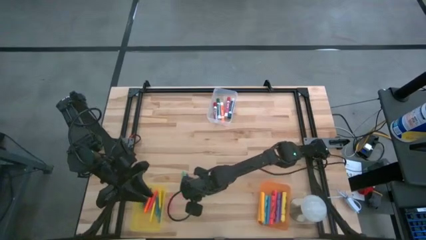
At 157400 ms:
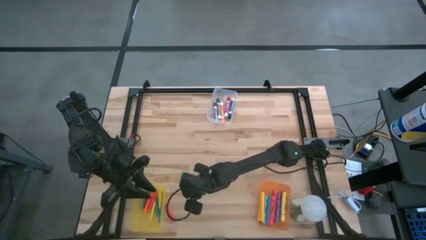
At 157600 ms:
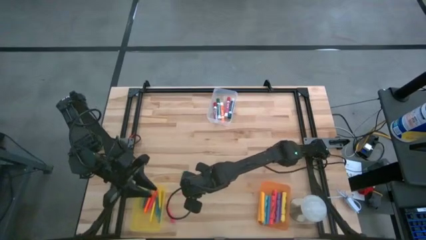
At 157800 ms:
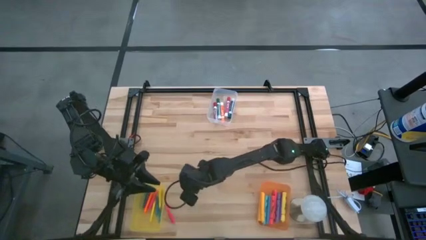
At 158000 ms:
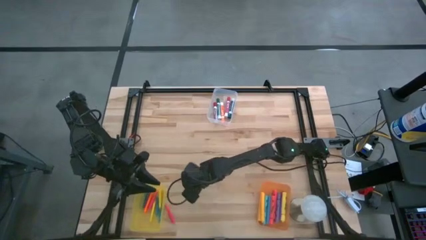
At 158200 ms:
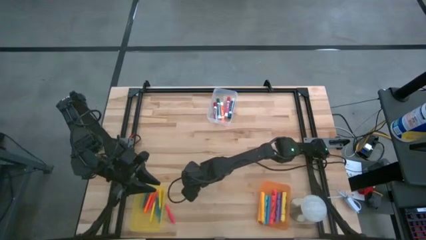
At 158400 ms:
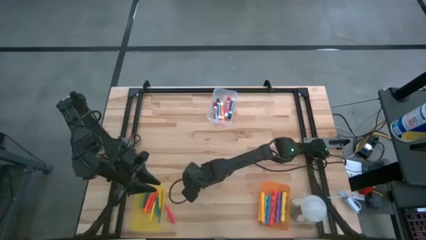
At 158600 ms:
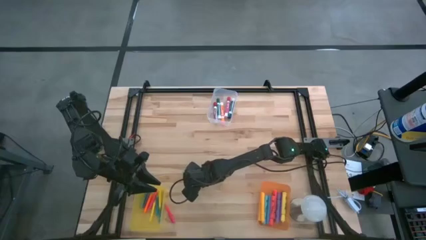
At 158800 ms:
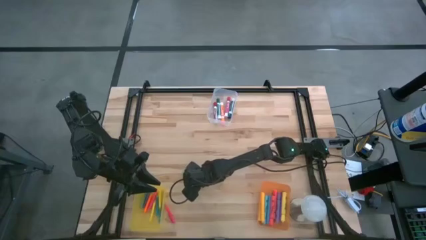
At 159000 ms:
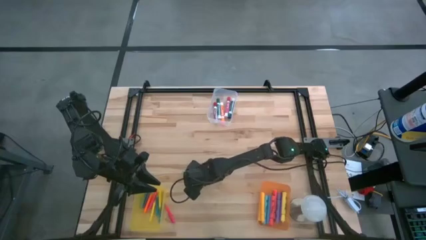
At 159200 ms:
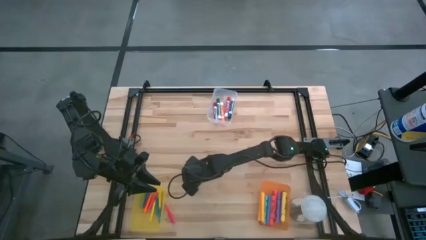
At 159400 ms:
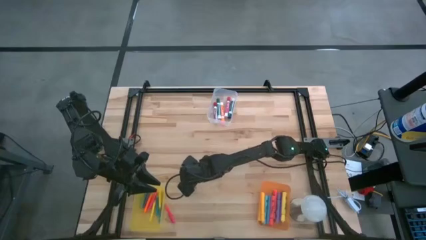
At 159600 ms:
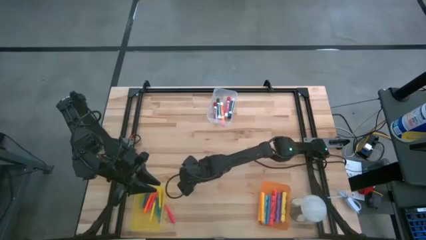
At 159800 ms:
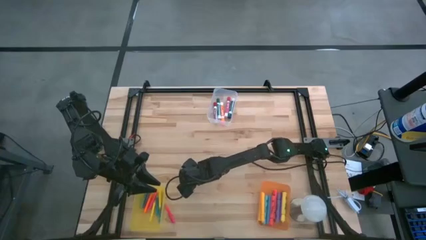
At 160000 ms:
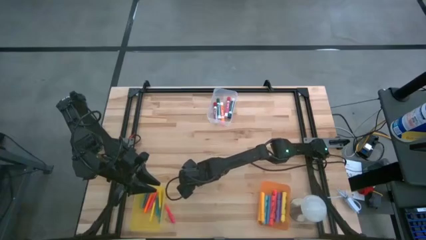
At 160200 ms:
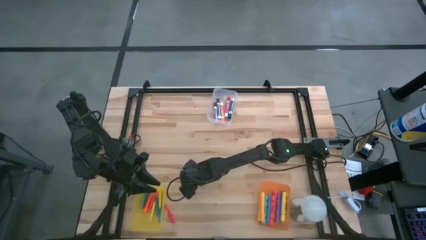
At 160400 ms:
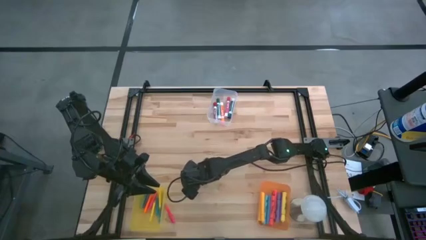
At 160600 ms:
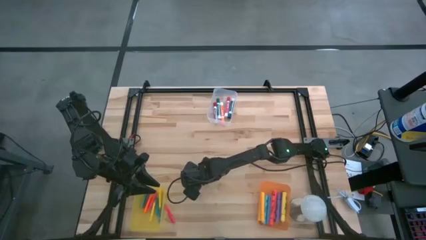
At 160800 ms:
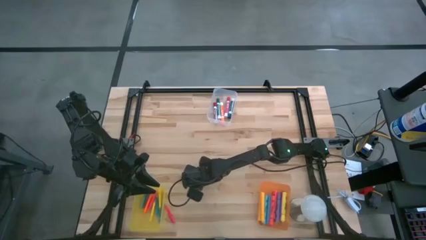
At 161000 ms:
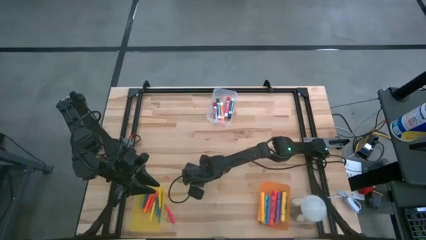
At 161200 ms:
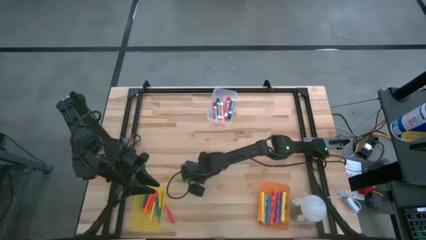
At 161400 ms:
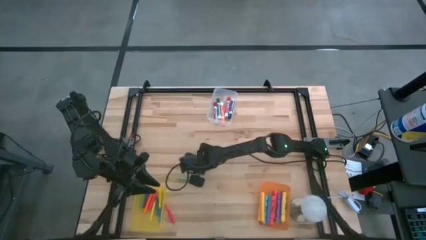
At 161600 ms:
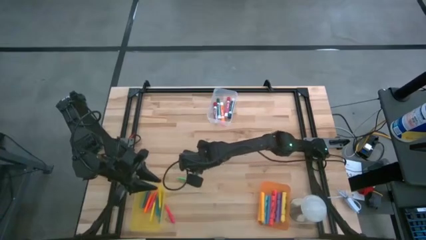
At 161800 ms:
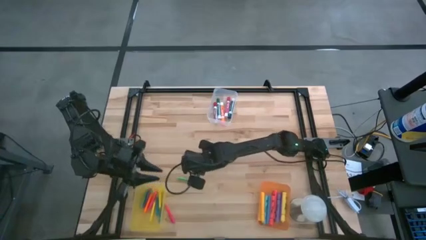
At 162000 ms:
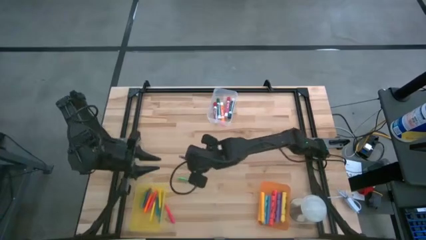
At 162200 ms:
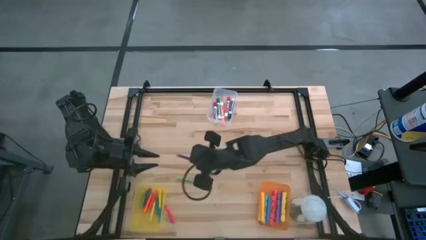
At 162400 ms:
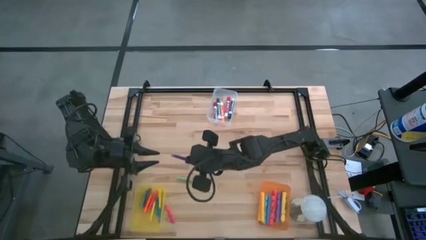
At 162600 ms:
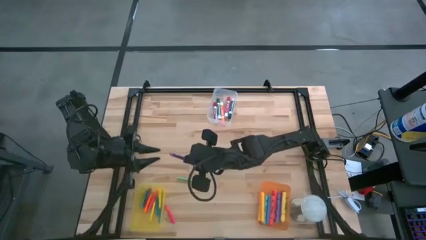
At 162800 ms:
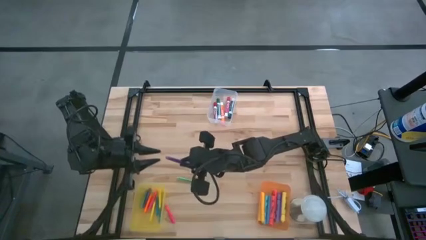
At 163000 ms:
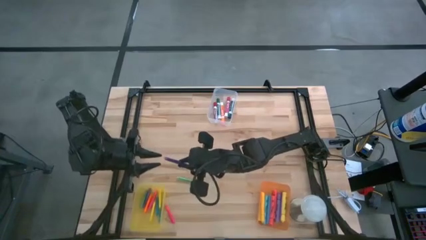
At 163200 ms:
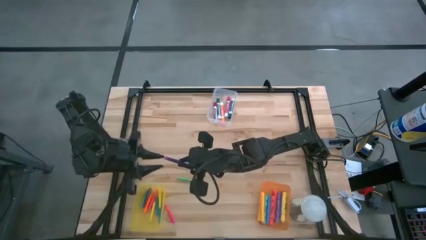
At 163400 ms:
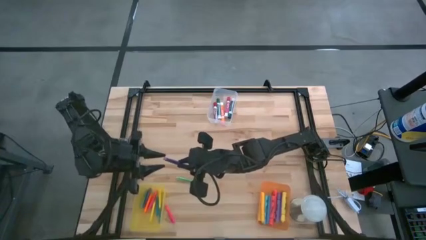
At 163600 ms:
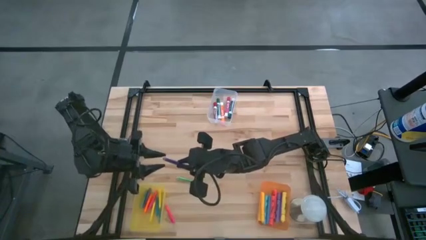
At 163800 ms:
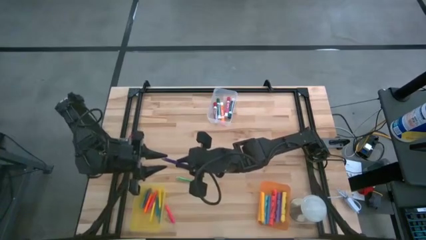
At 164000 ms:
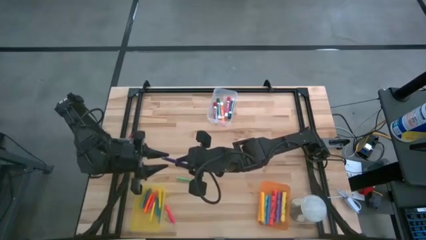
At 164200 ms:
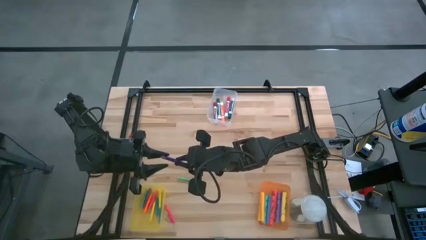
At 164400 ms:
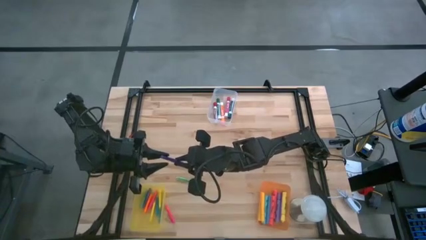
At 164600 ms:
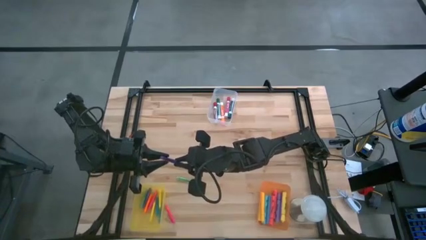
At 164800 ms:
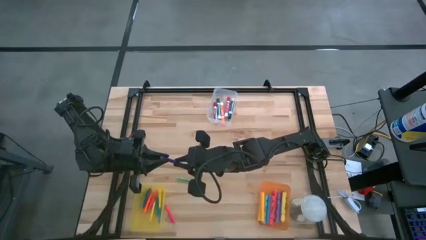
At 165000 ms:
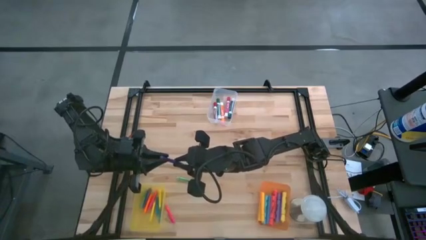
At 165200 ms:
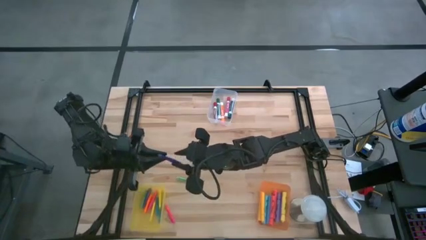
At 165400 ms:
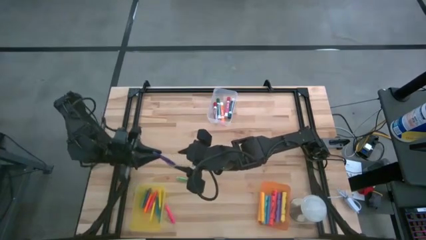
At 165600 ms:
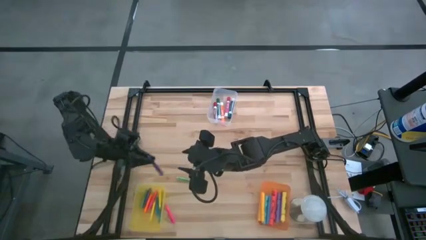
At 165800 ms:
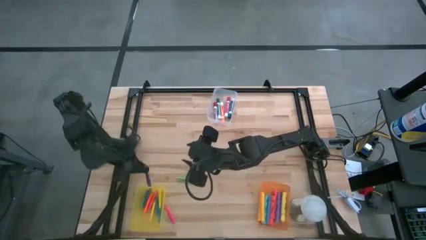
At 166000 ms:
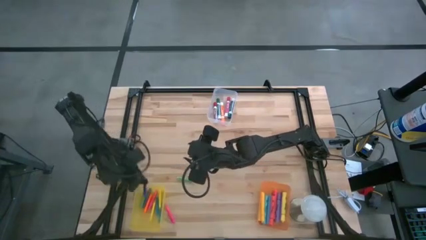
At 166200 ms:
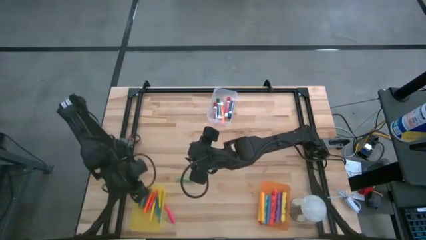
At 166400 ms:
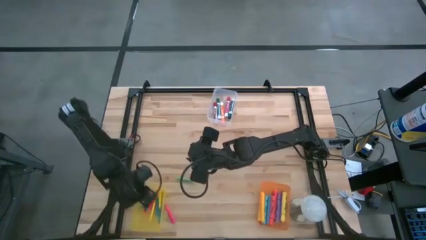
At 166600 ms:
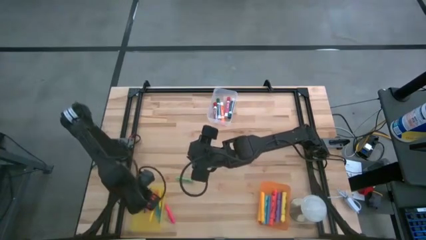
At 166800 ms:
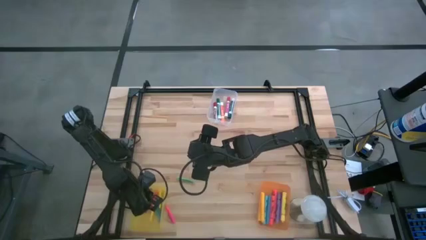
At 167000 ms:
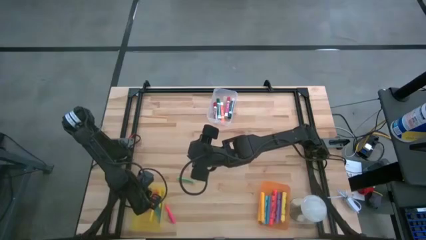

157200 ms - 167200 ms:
Task: Pick & Place Markers
Put the violet highlighter into the yellow bin

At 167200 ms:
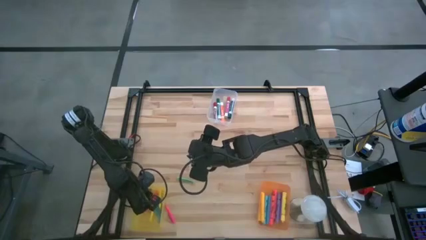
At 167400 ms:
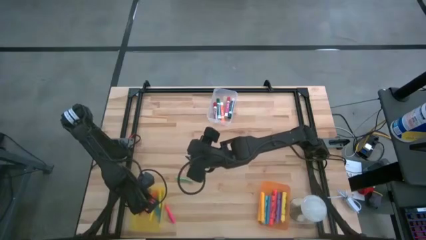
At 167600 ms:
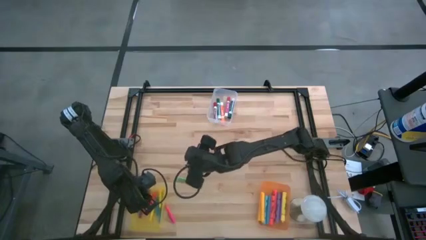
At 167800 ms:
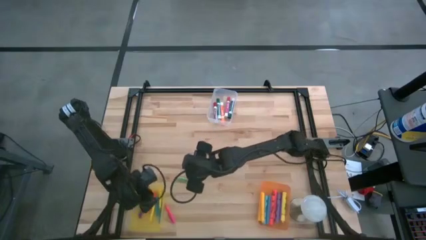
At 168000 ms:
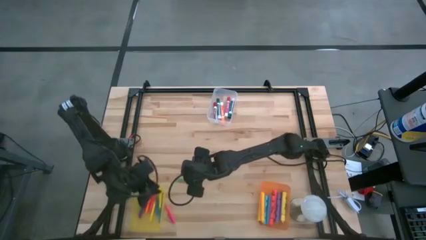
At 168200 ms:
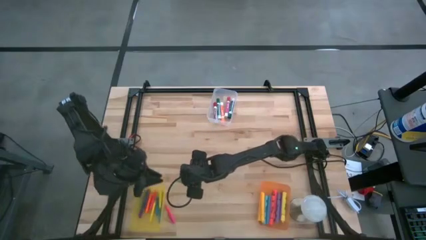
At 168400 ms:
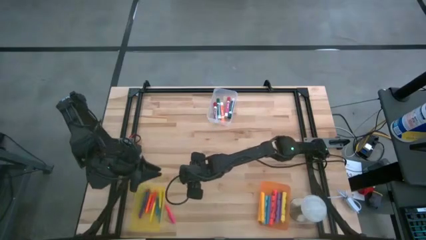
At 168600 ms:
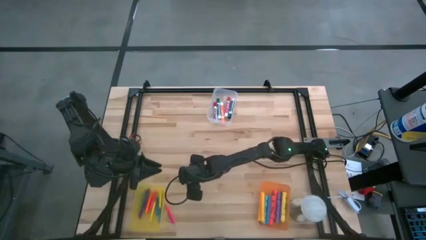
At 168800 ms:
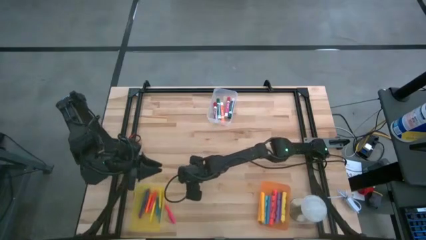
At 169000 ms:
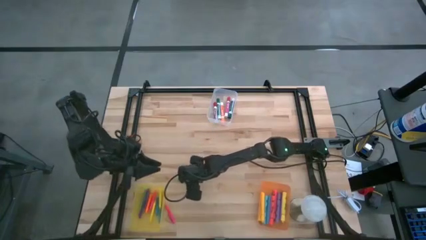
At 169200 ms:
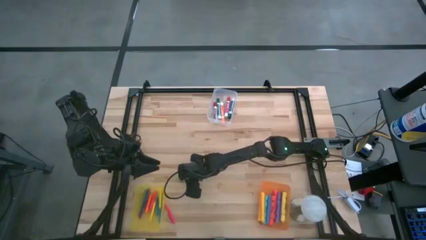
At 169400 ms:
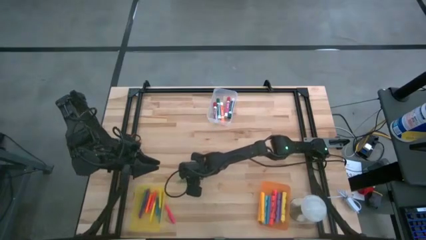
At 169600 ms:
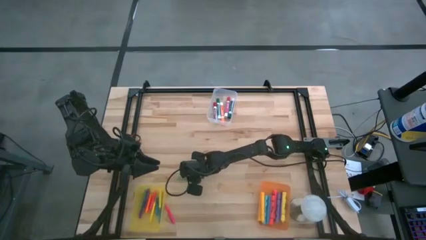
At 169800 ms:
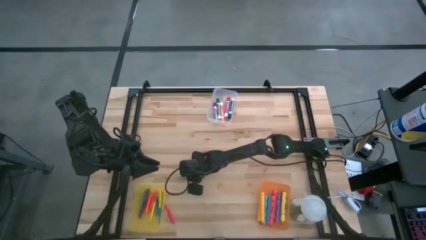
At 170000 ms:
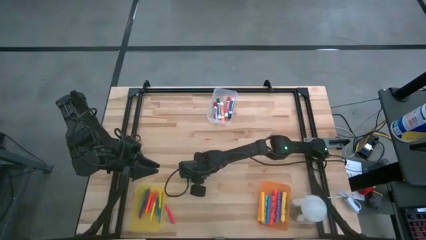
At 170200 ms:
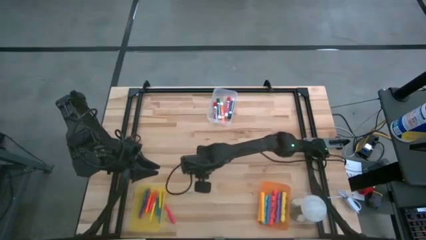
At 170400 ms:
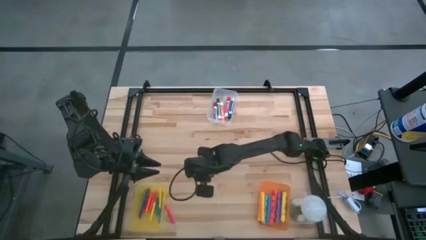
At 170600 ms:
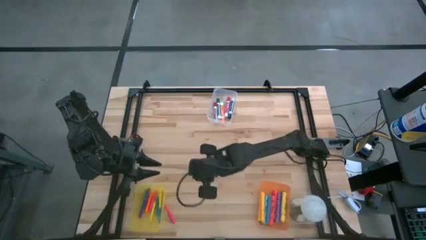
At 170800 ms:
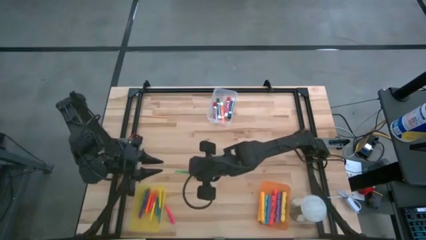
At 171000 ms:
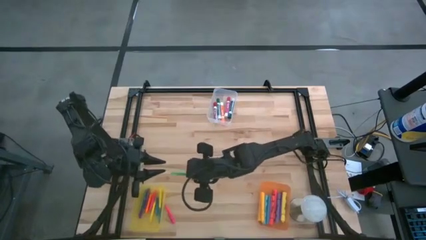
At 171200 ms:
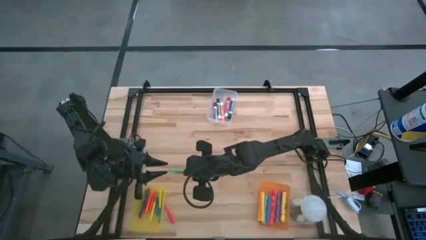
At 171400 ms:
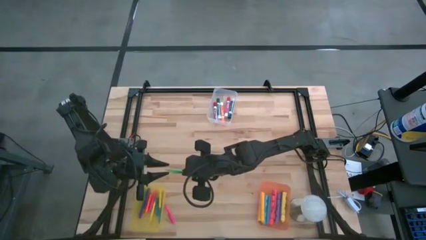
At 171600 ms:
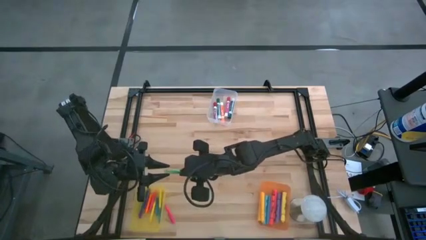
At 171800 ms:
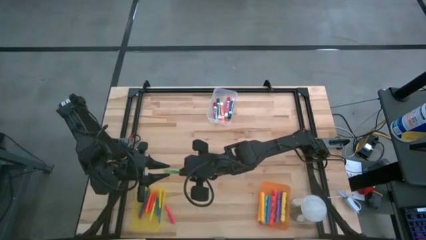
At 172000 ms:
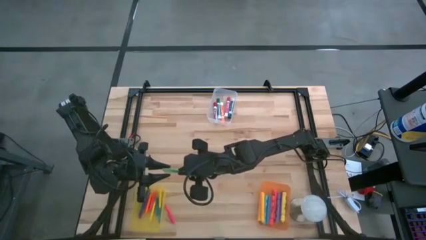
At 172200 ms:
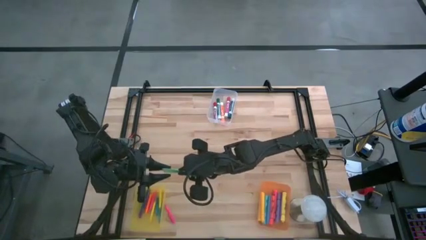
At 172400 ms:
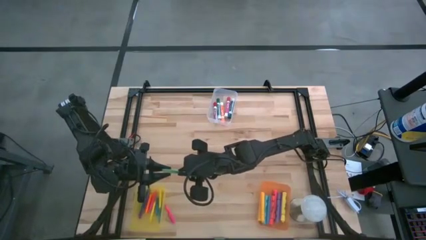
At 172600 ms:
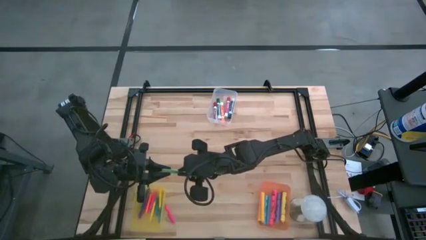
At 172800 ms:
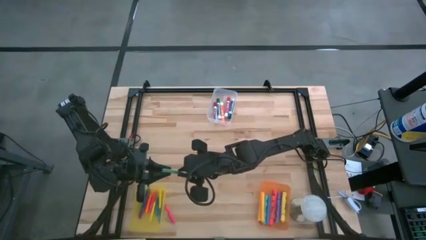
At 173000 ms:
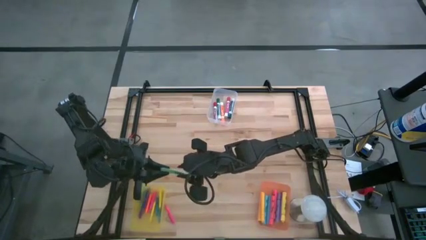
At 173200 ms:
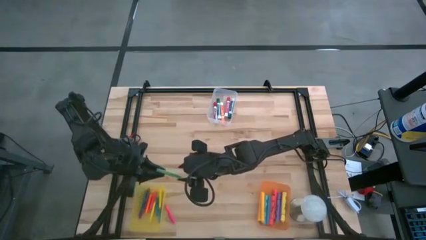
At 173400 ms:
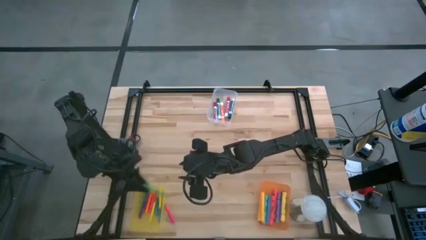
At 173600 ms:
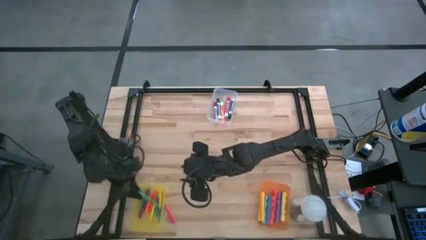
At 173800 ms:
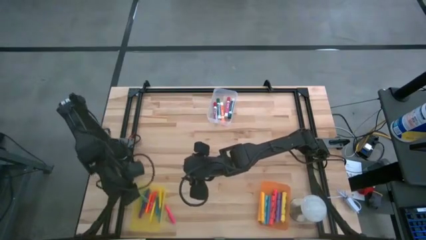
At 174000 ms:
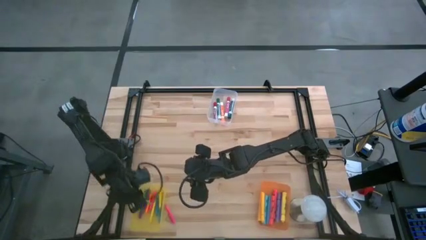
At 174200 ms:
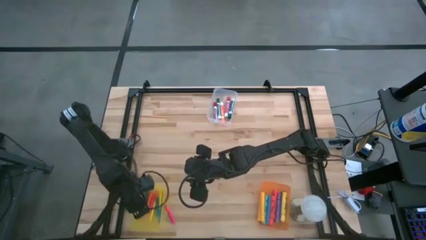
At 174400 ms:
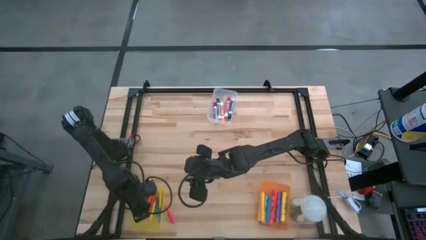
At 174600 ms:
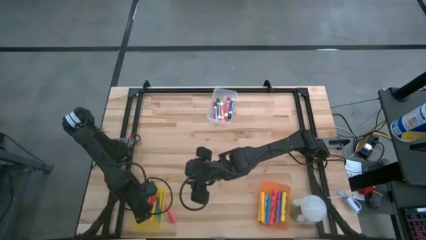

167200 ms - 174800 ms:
Put the green highlighter into the yellow bin
